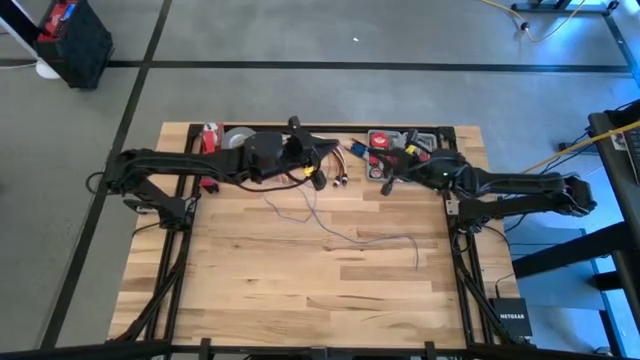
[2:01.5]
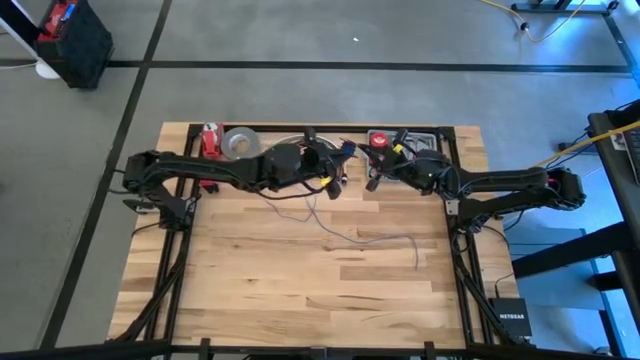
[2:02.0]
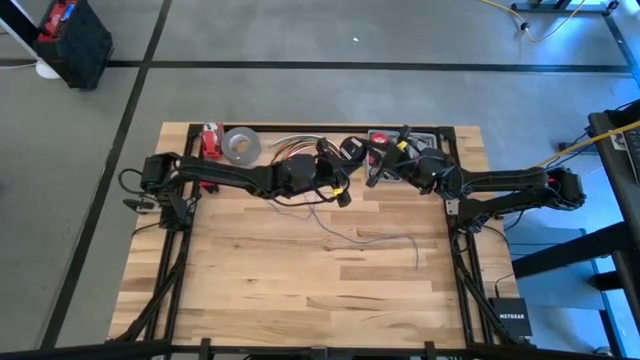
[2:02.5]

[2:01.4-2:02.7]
Task: Coil cords
Coil the blue wire on the black spool

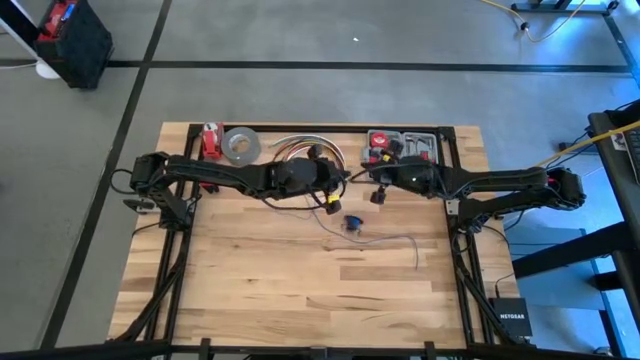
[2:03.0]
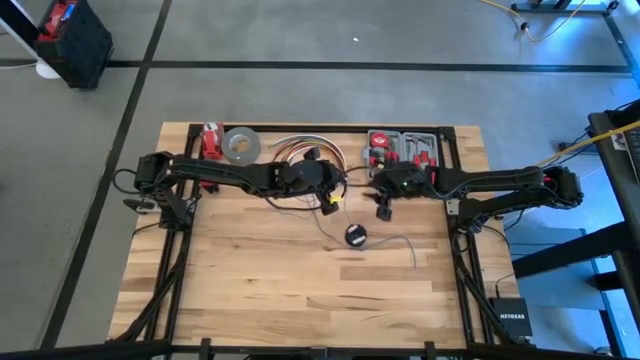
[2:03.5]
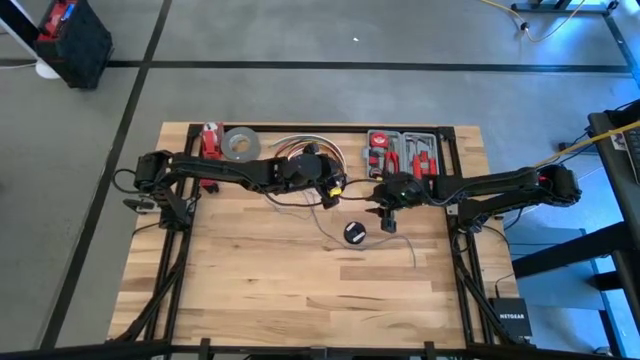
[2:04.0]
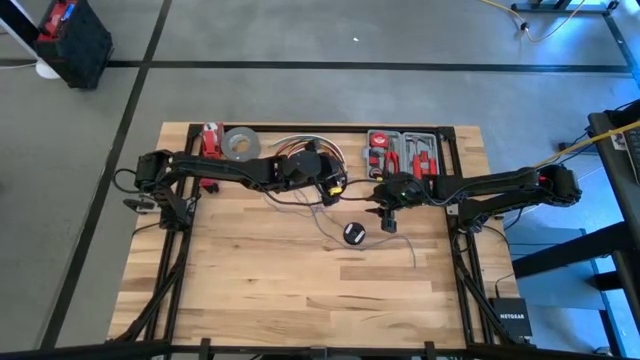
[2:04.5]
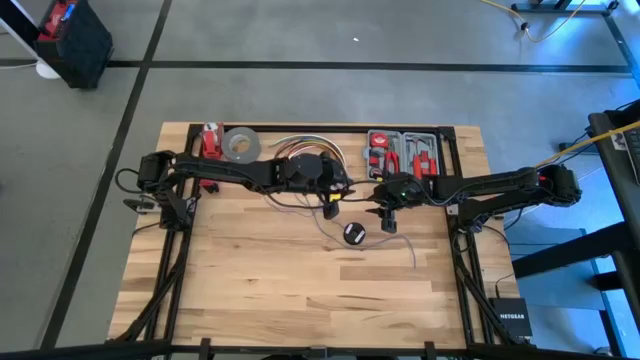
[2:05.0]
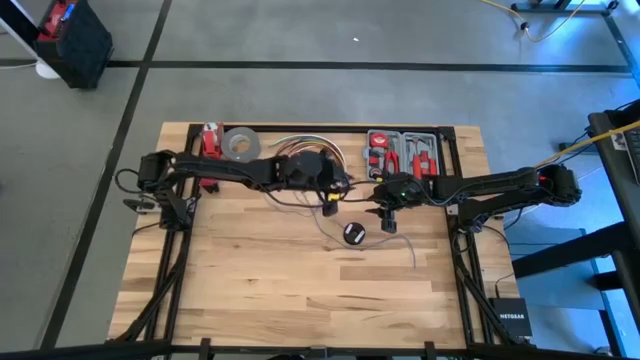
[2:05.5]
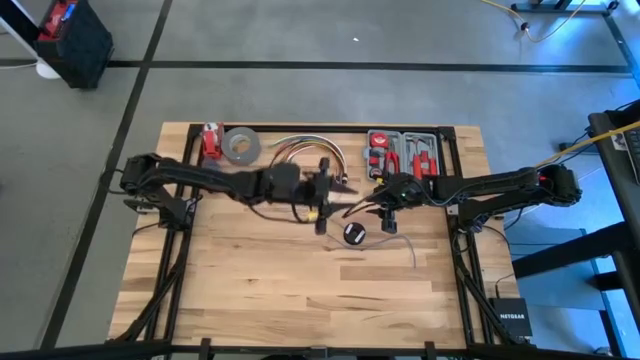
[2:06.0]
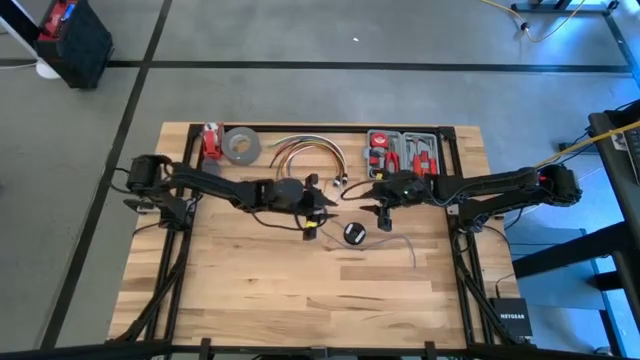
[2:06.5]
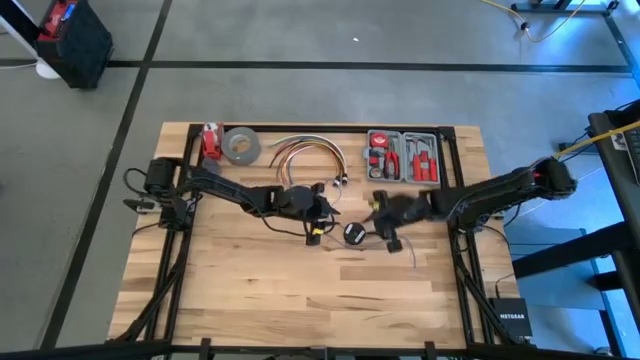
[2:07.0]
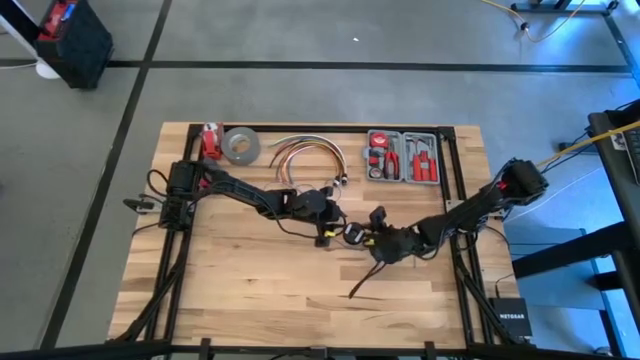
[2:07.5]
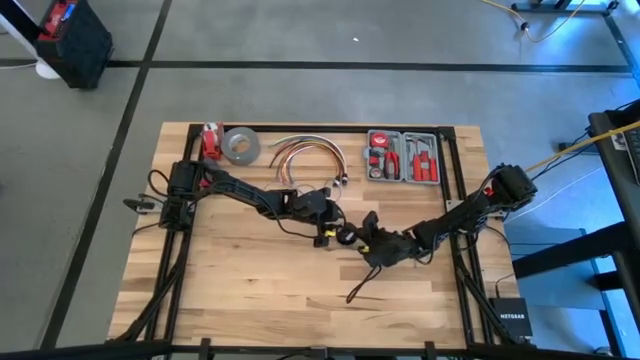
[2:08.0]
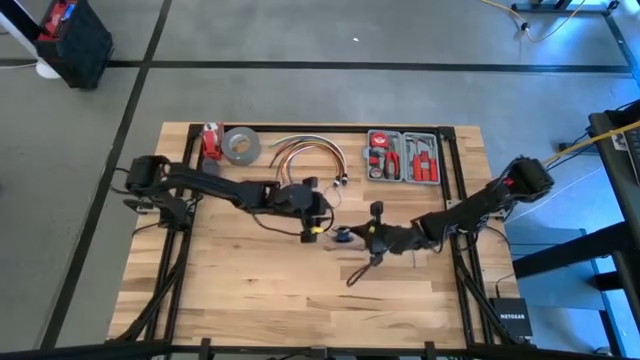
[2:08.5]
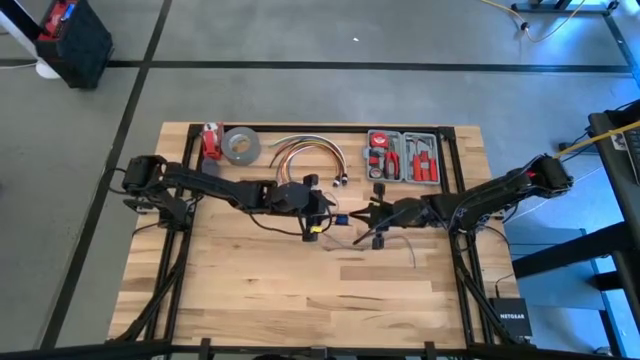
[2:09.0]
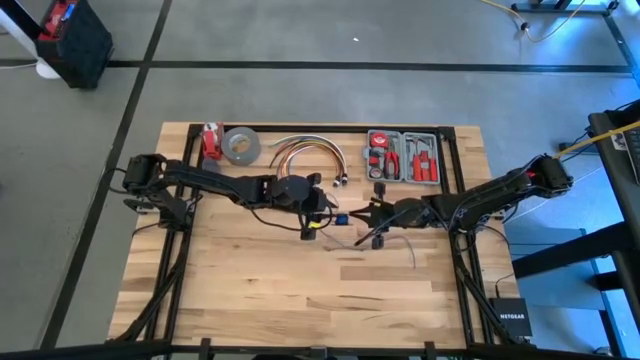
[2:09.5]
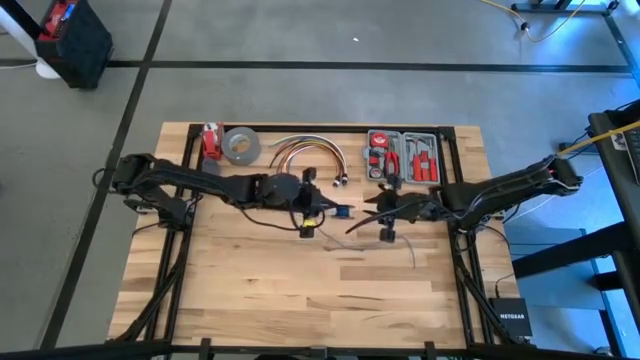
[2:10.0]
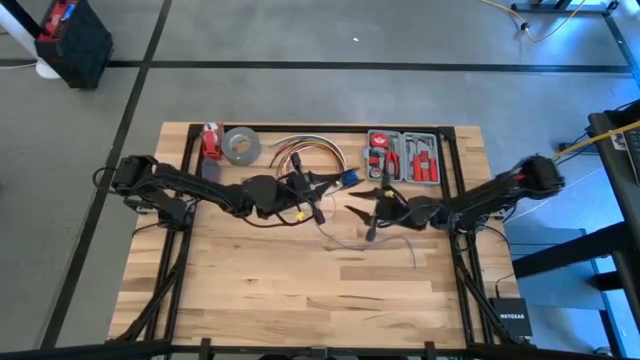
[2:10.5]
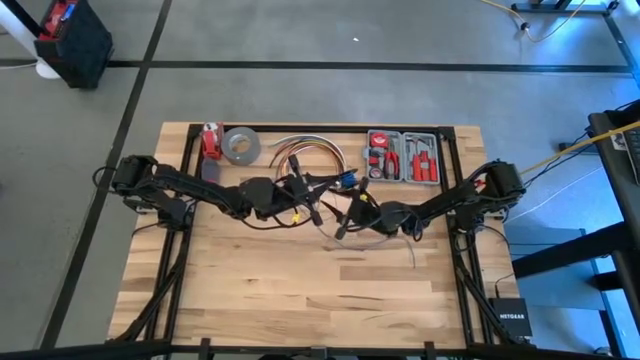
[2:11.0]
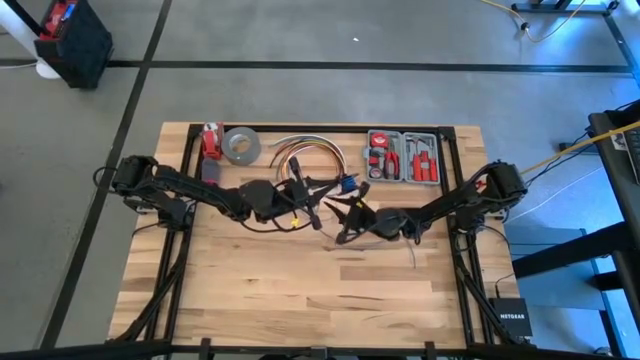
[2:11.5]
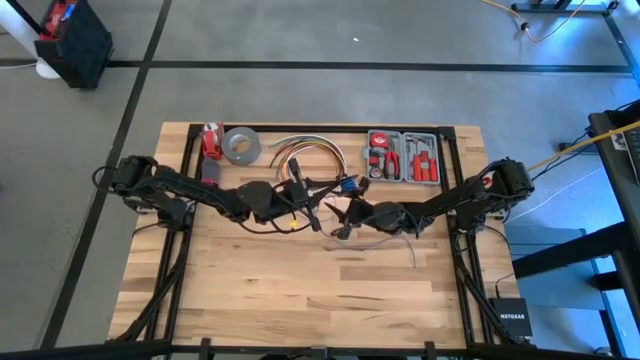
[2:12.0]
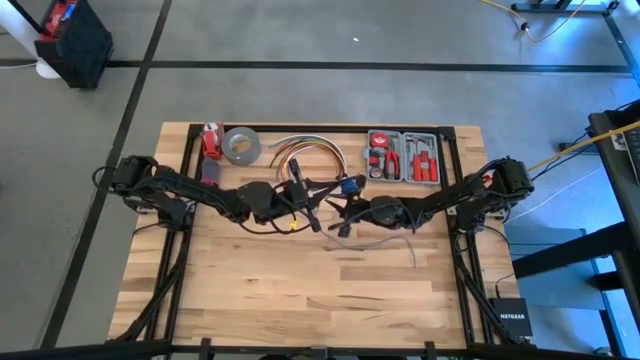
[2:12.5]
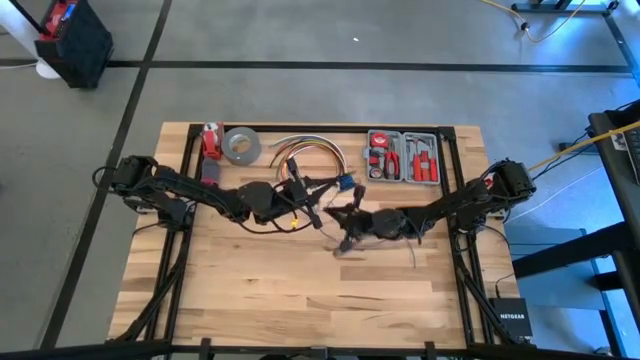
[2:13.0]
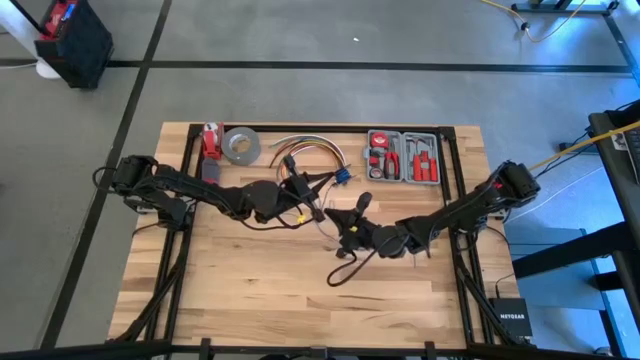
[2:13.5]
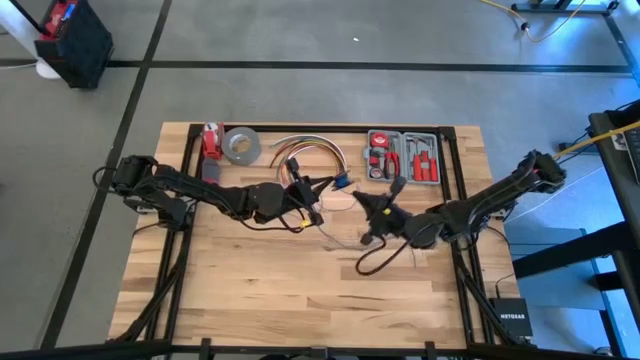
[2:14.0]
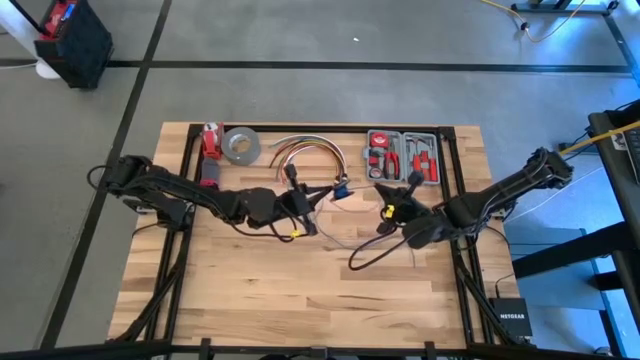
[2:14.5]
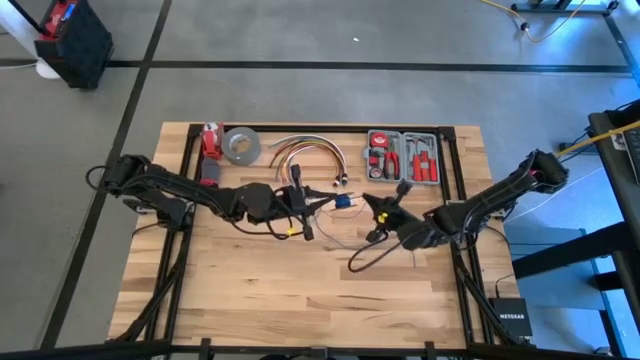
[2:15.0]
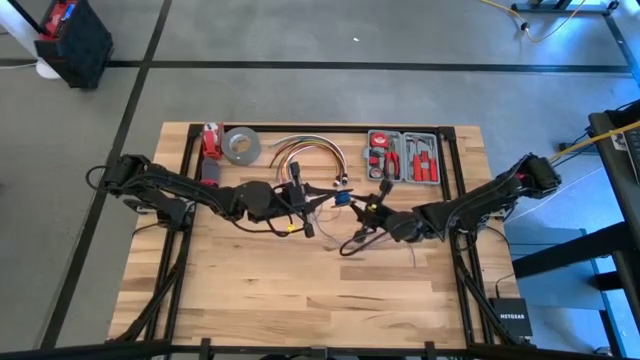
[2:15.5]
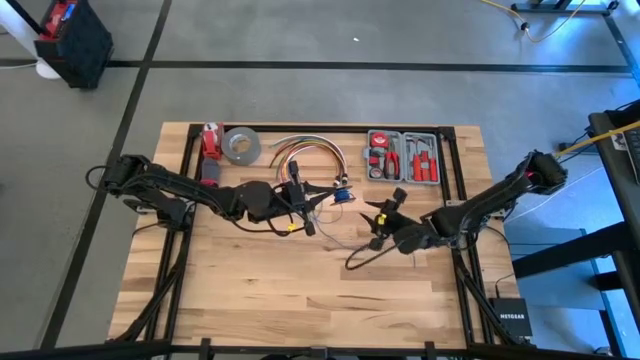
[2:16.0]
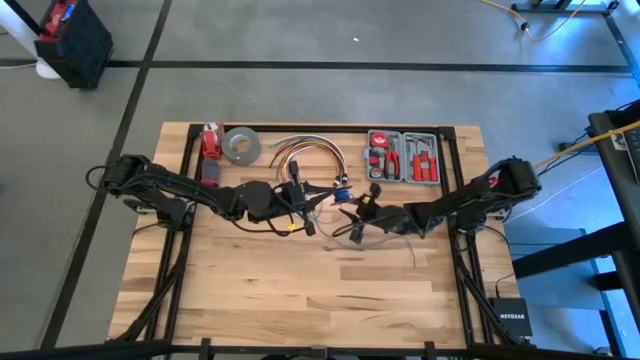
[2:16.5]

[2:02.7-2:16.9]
Coil the blue wire on the black spool

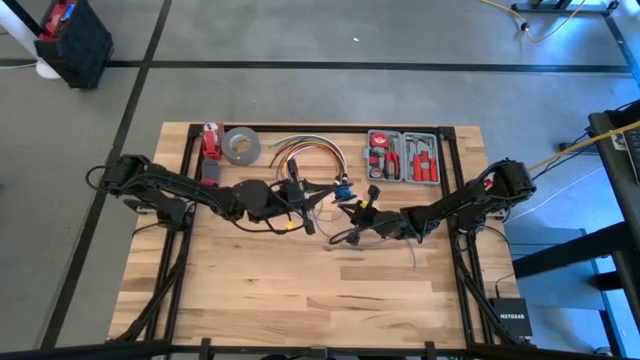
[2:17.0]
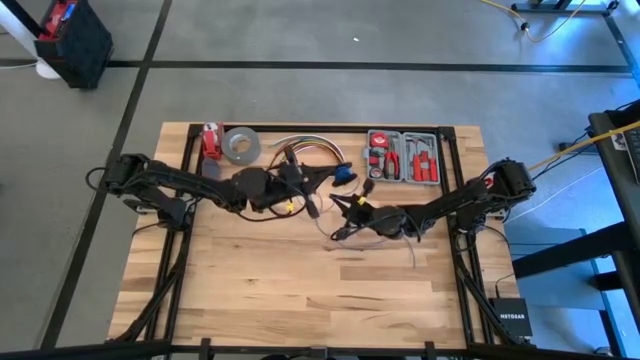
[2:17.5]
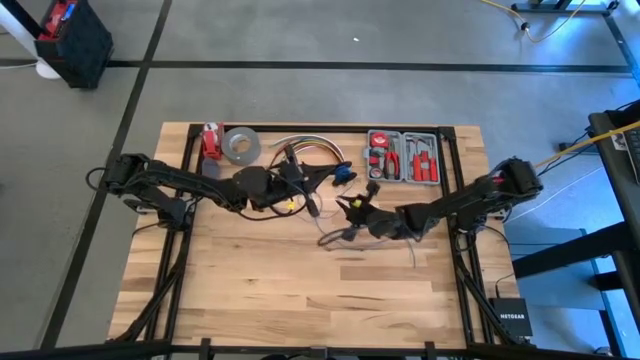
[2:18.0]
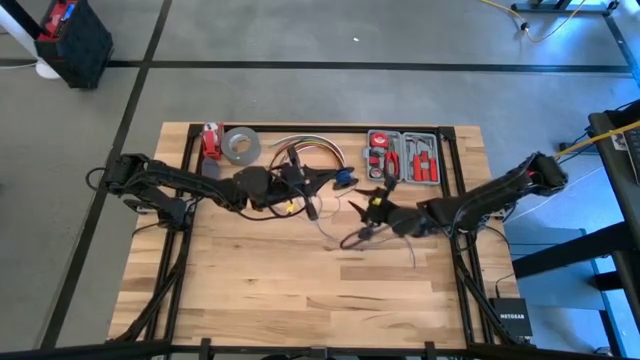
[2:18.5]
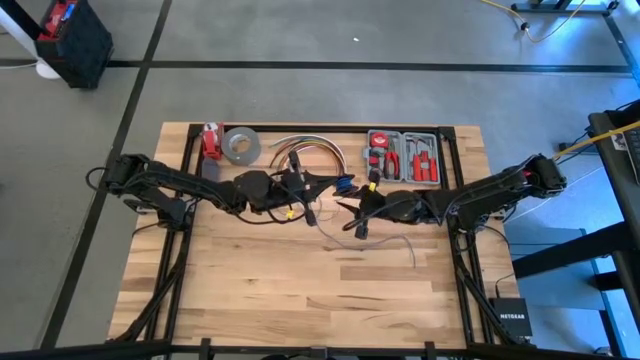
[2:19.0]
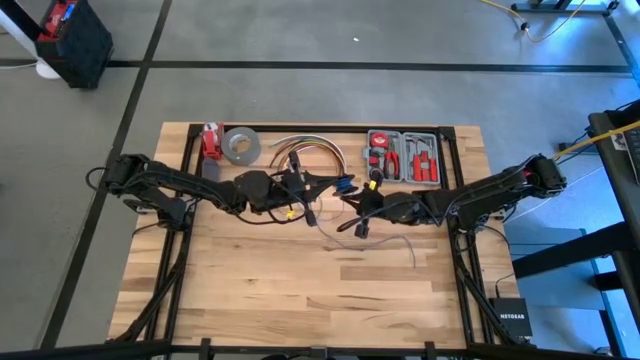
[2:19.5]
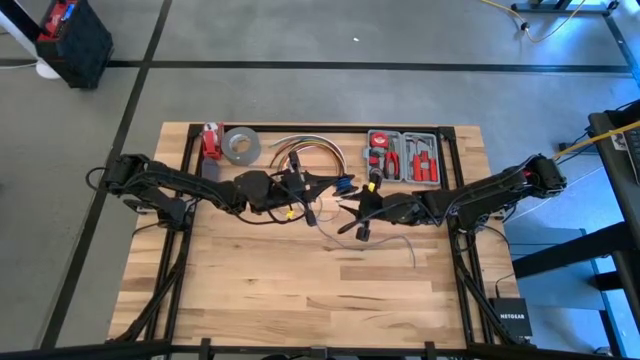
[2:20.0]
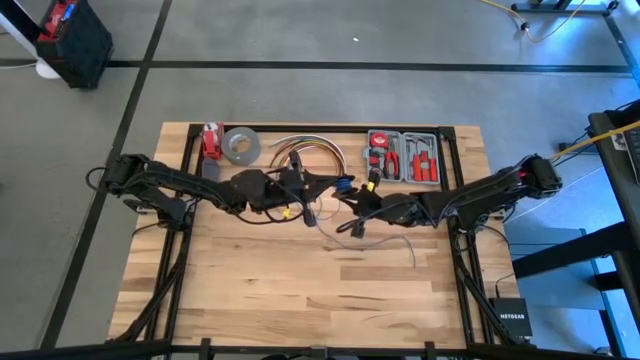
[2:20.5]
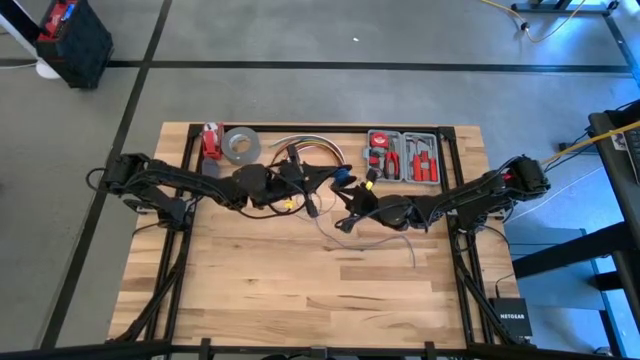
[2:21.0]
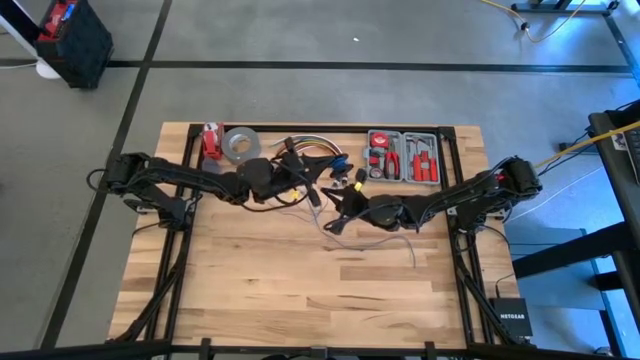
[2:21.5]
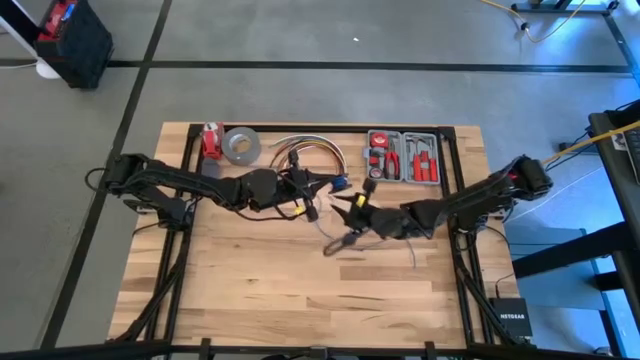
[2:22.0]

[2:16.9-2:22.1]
Coil the blue wire on the black spool

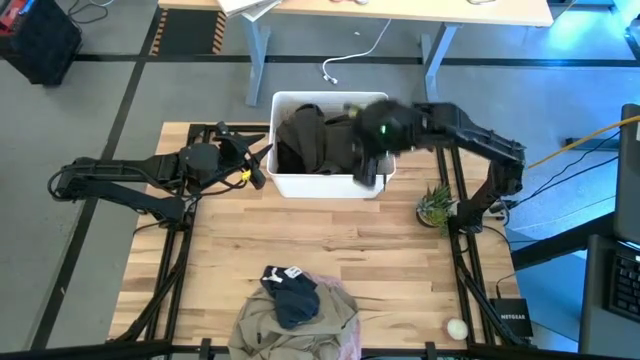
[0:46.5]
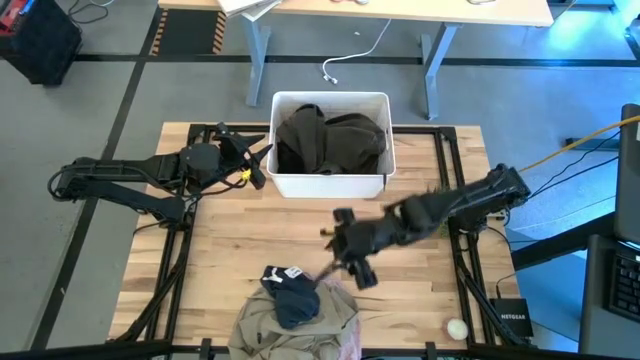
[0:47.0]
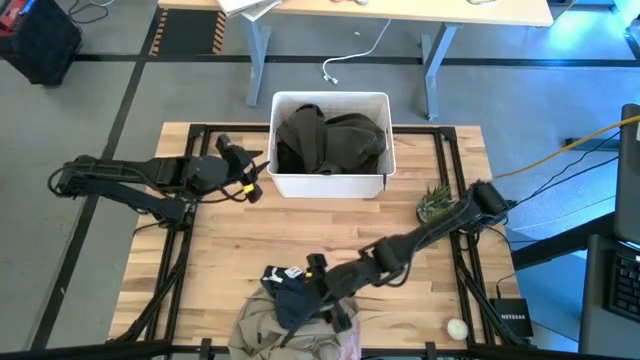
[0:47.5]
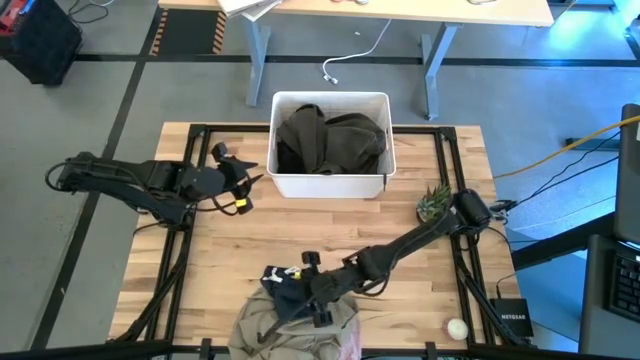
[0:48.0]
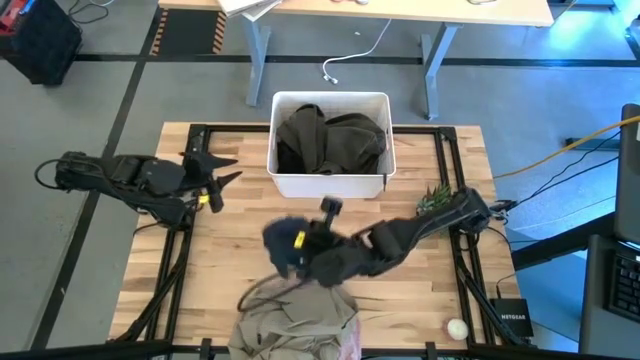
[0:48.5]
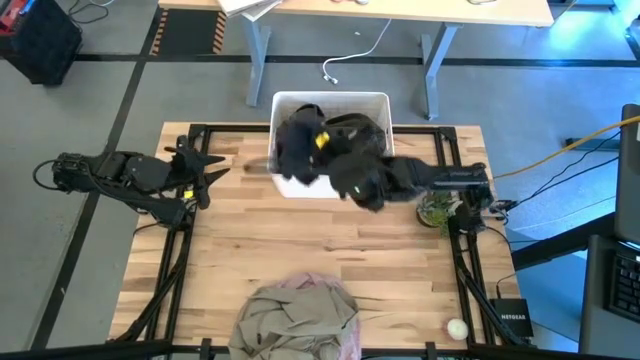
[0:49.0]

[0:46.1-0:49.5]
Task: Sort clothes
Put the blue shirt into the white bin
